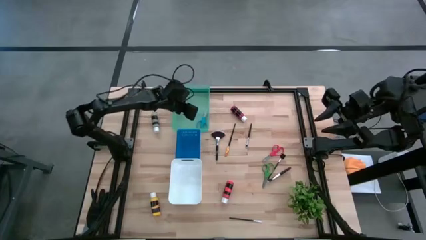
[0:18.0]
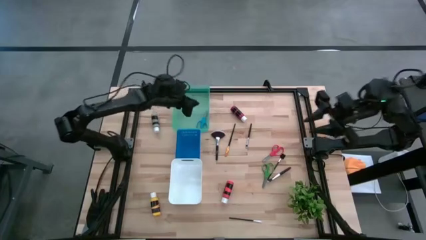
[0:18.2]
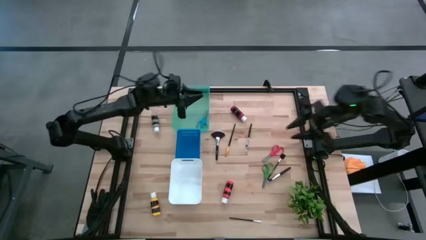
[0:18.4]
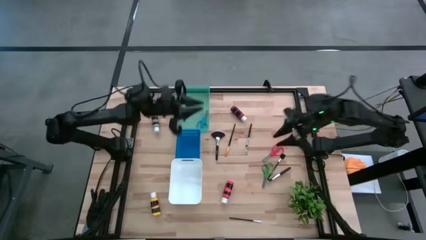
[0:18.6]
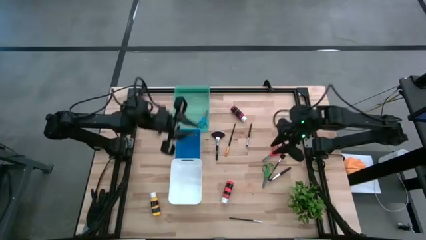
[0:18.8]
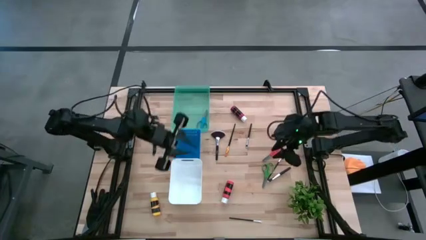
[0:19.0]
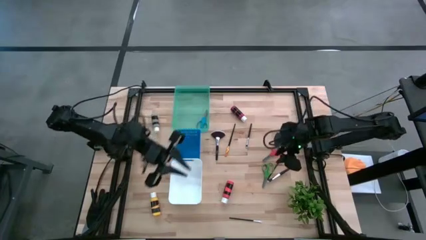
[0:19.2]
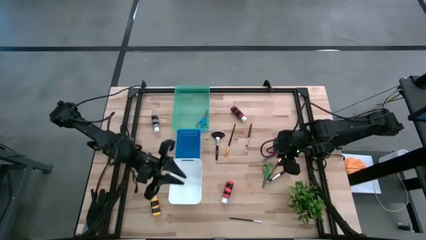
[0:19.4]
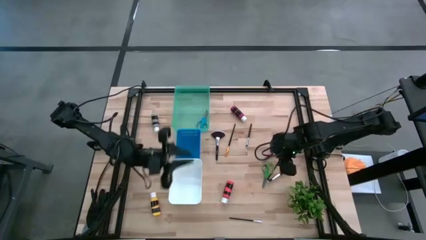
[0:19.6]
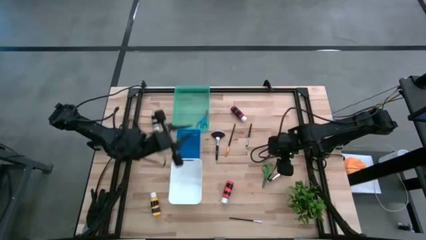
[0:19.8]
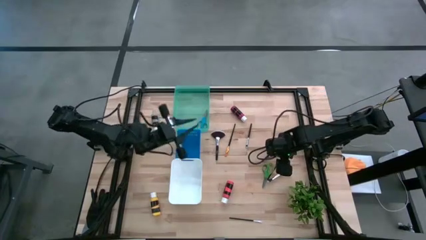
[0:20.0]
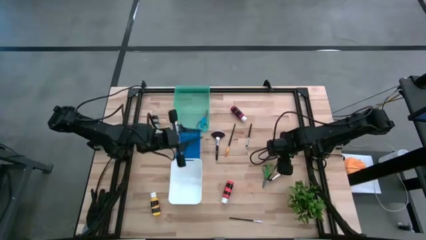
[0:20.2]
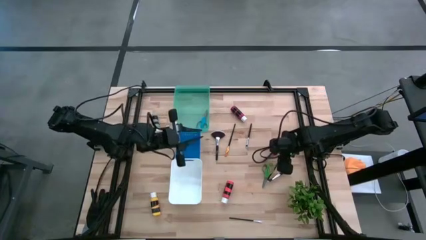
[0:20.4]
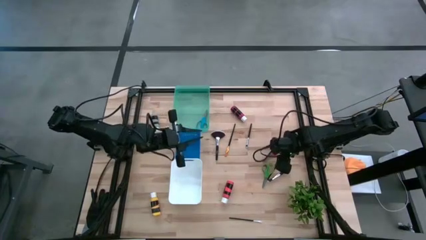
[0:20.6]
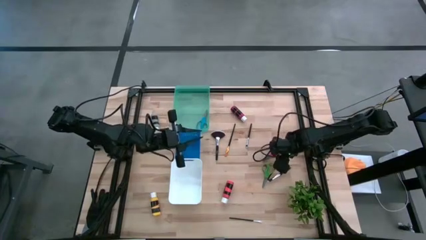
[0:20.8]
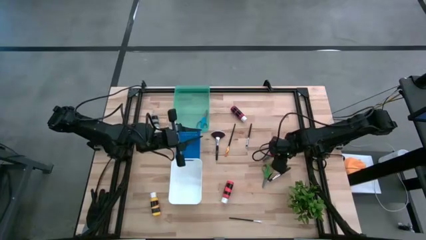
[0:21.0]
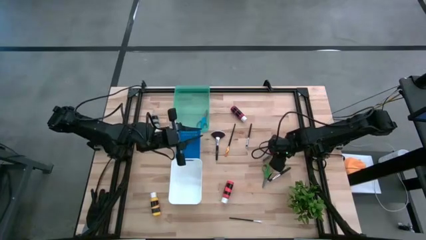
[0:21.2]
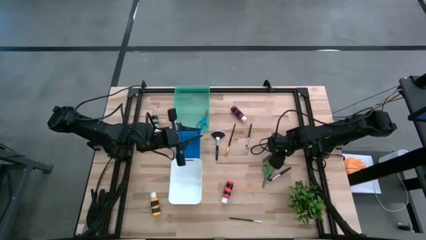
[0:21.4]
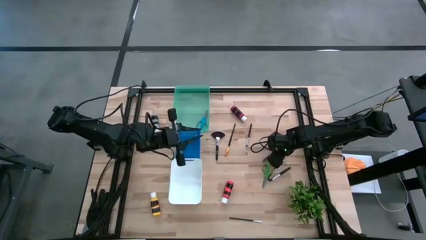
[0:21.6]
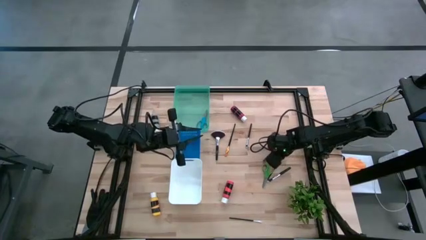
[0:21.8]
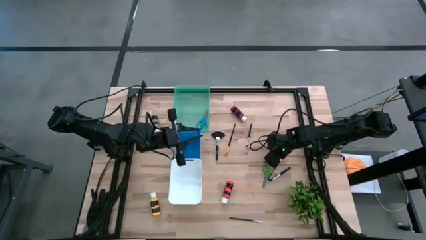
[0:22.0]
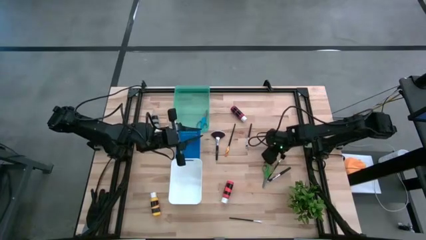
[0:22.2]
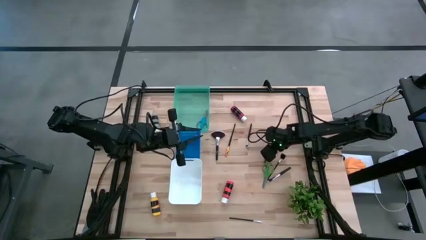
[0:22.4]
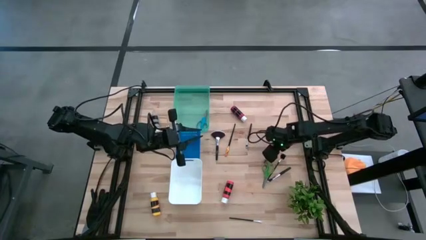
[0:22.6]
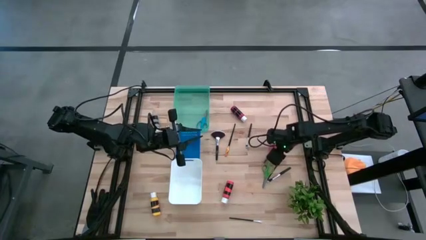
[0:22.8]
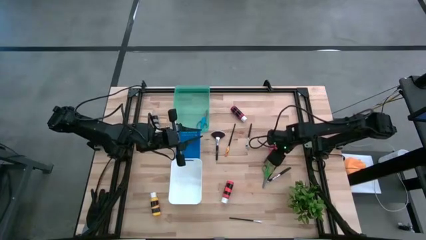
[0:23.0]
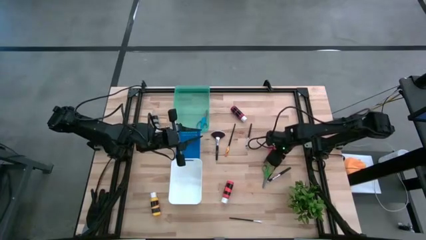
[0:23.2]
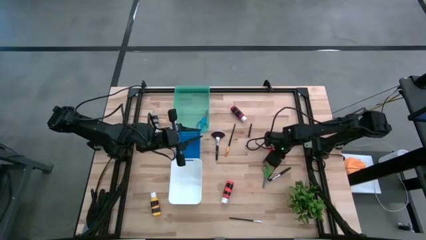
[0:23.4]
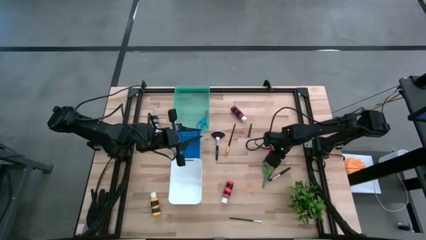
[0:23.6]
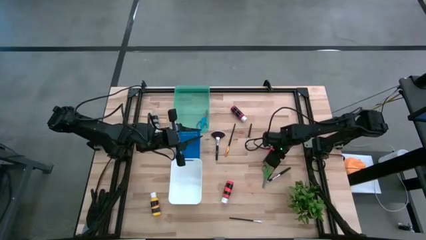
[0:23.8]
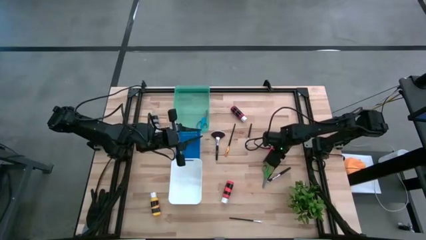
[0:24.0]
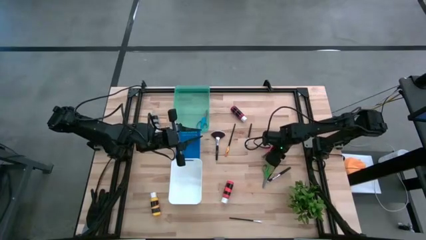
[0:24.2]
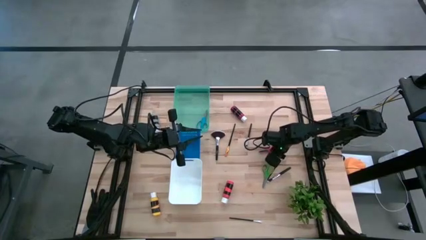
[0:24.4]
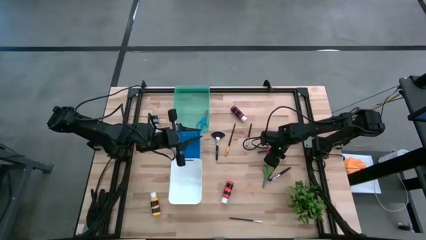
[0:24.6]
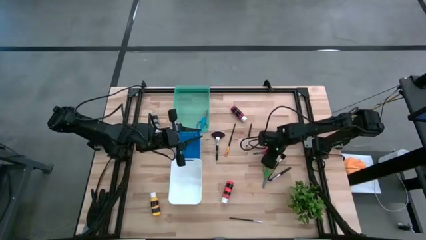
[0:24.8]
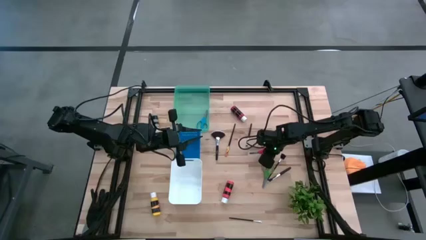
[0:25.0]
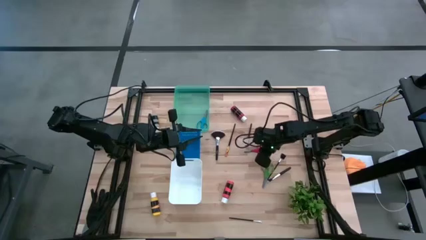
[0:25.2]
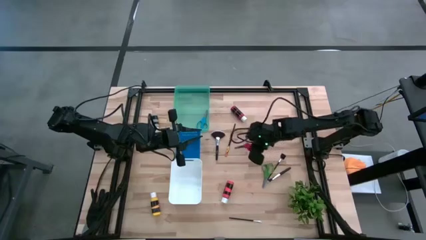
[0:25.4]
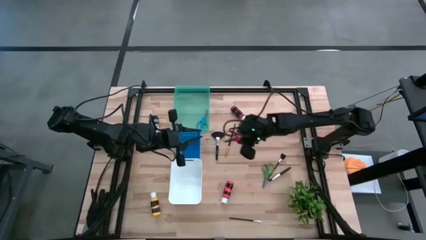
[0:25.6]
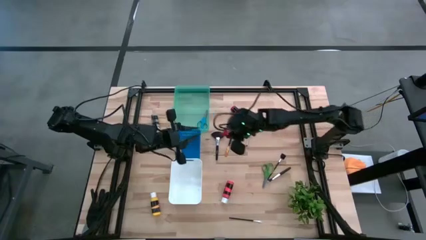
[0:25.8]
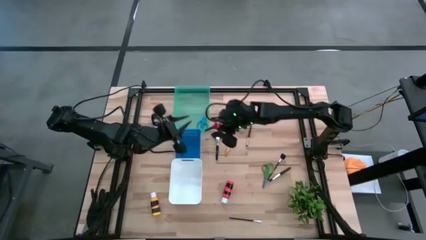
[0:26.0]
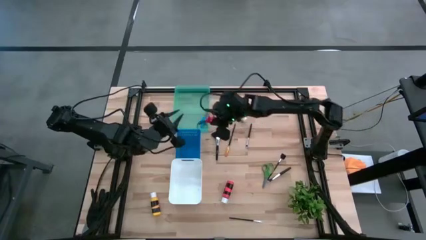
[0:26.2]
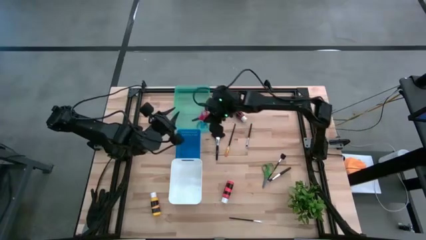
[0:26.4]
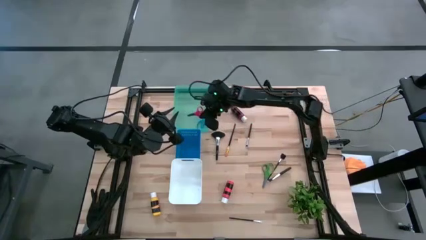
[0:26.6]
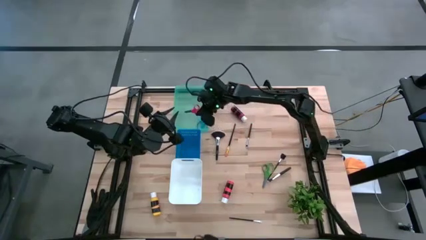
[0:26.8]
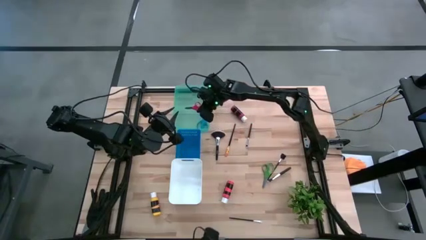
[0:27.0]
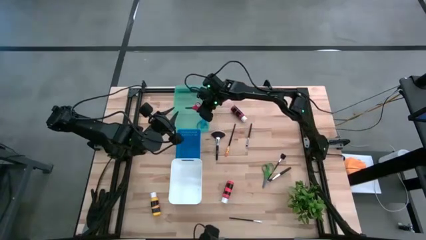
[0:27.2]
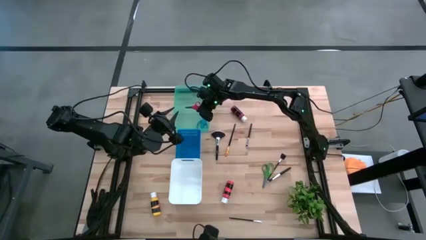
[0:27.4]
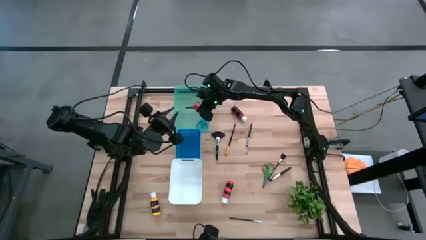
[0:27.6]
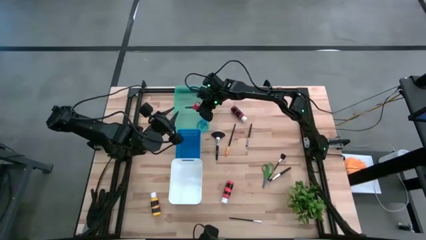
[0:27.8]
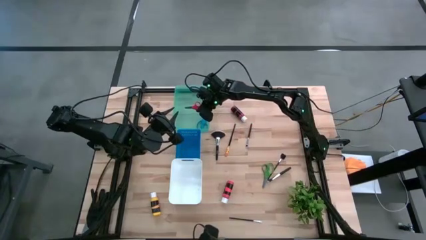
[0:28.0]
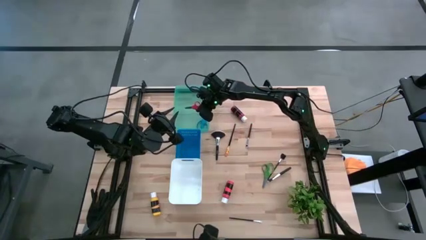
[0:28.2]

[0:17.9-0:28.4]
Task: Pick & Place Paint Supplies
Put the red scissors into the green bin

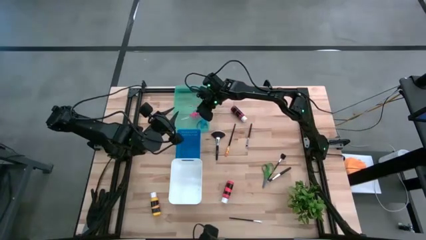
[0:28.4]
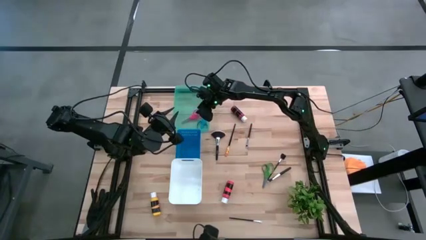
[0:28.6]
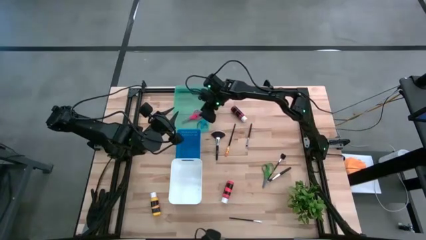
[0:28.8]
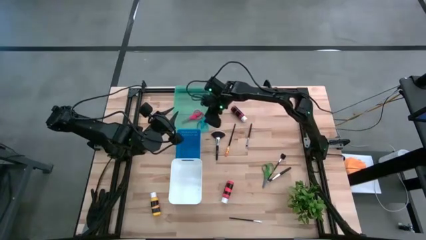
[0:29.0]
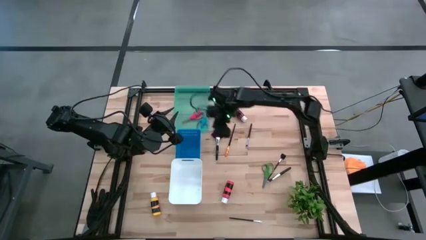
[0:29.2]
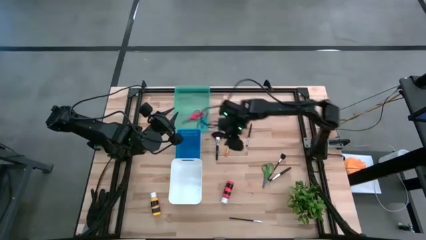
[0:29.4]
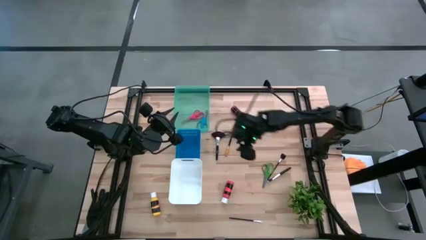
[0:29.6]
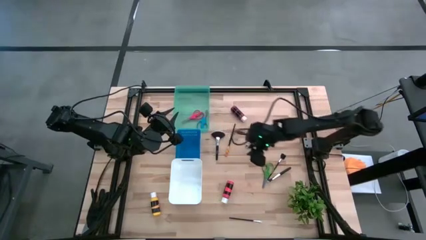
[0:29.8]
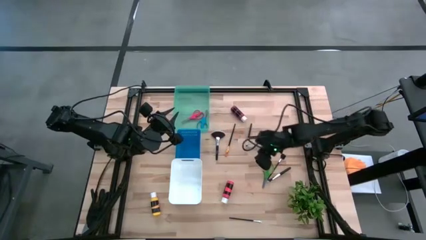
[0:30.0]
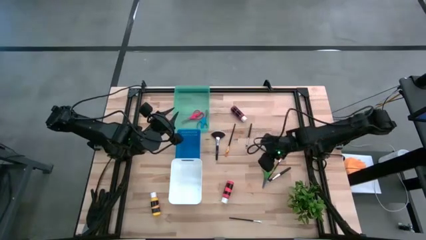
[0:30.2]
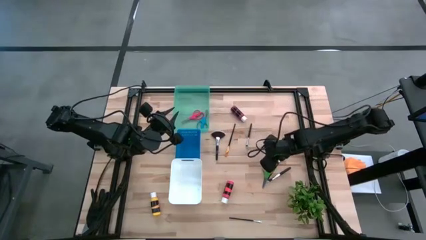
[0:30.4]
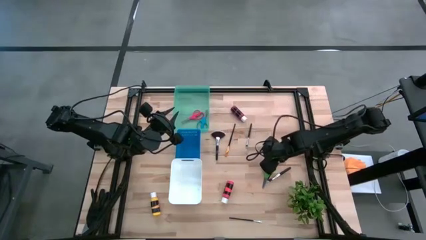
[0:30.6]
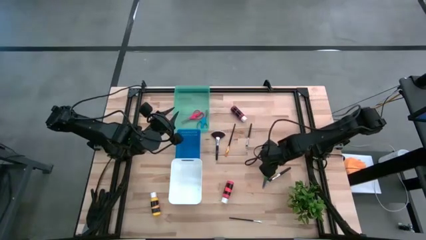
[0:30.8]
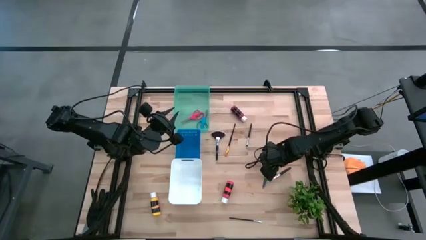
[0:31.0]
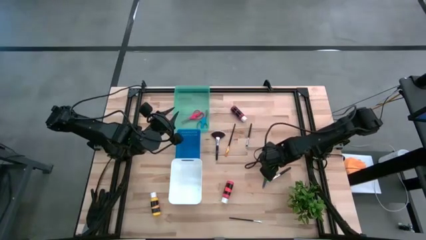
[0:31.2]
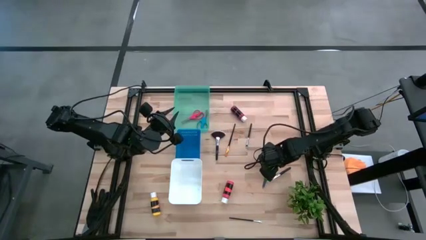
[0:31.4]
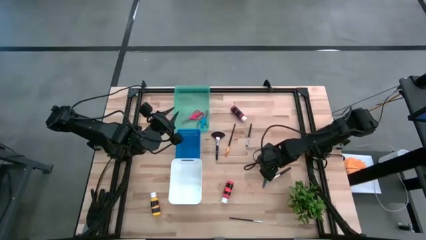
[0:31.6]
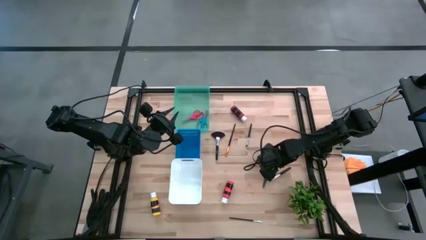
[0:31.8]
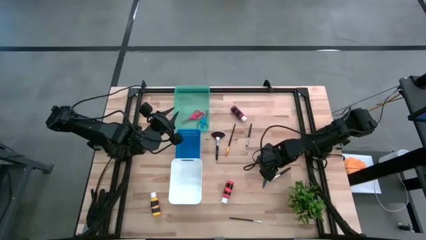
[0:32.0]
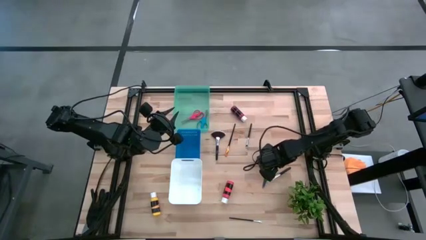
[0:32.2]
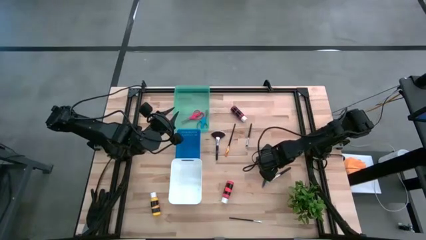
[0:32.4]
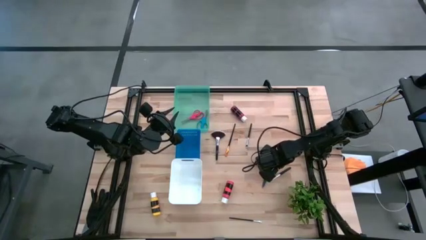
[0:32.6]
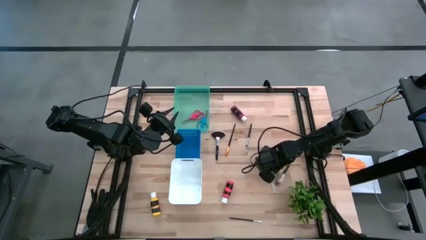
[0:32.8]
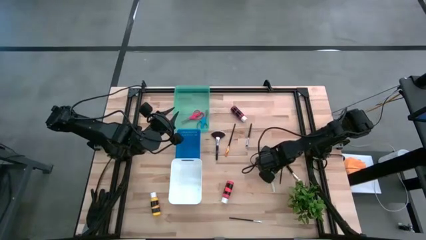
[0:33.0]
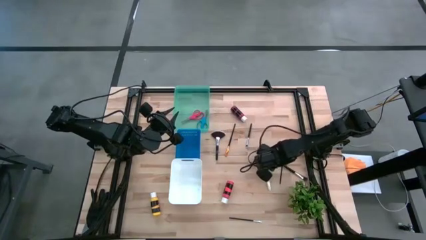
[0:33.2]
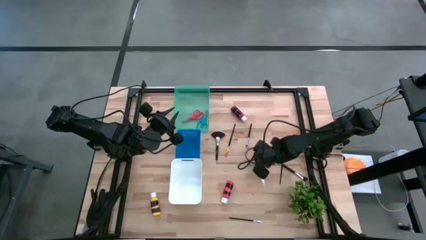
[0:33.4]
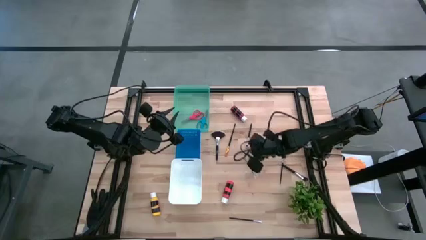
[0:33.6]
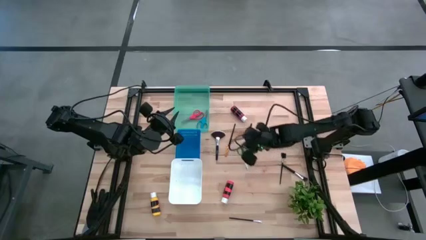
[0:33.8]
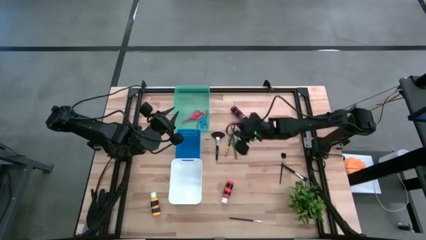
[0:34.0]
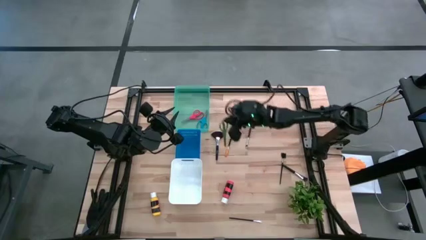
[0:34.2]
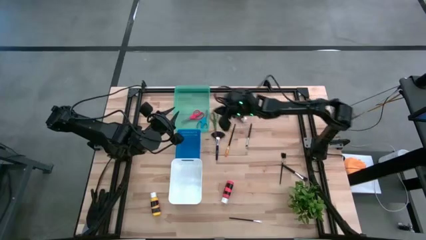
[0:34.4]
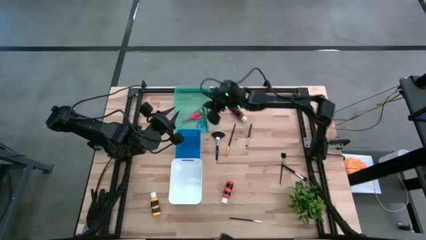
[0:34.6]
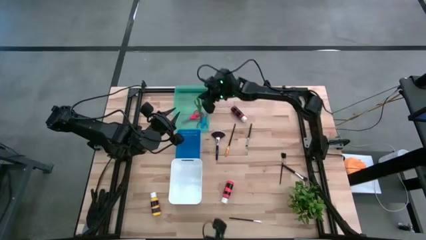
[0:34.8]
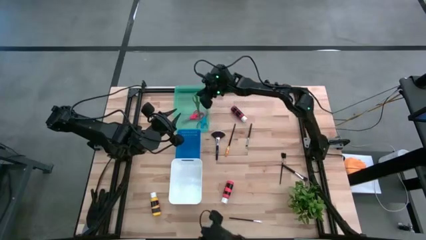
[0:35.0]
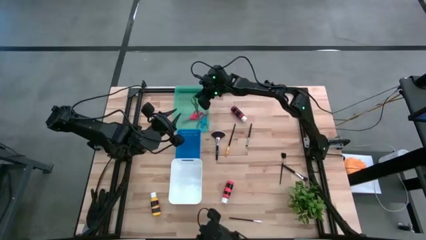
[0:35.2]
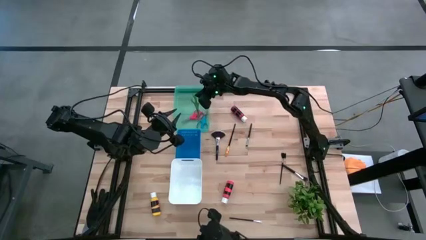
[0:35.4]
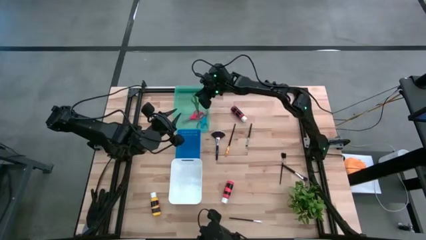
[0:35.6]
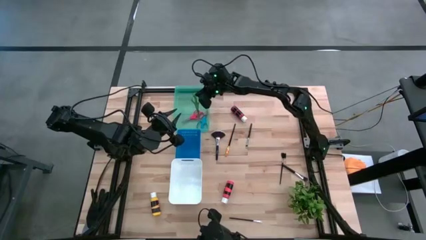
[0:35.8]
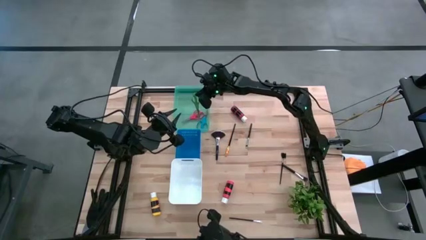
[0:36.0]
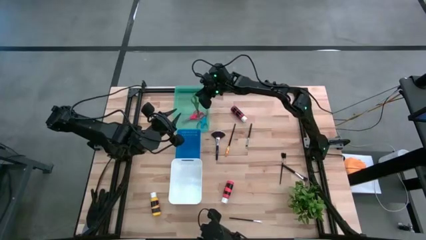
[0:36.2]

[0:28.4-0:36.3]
Put the green scissors into the green bin
